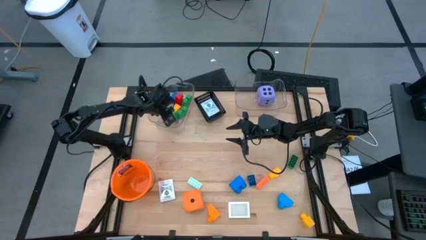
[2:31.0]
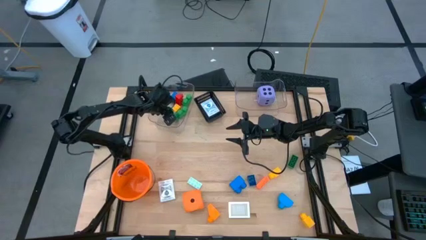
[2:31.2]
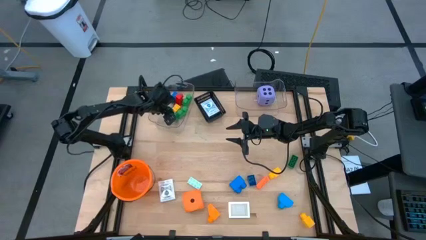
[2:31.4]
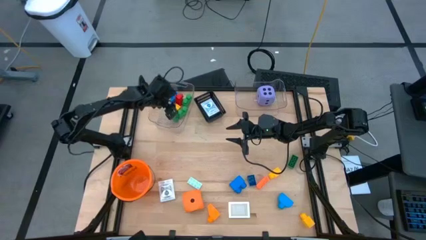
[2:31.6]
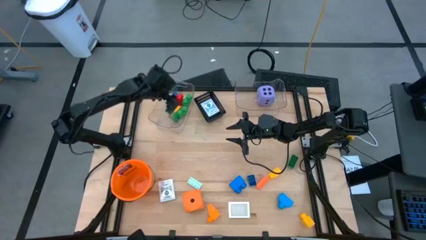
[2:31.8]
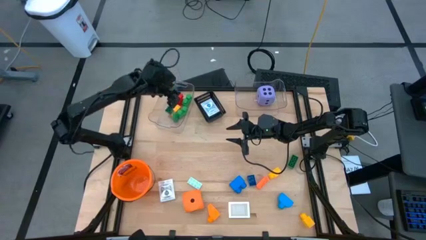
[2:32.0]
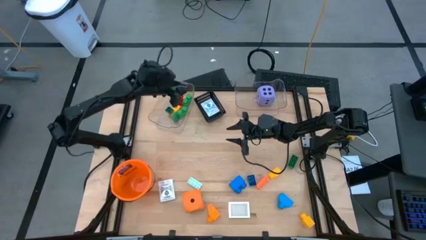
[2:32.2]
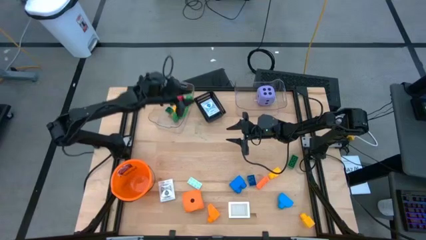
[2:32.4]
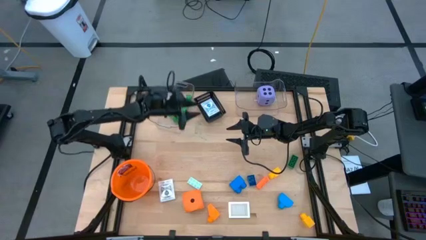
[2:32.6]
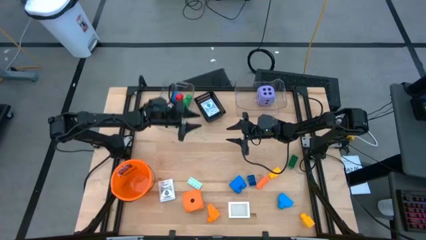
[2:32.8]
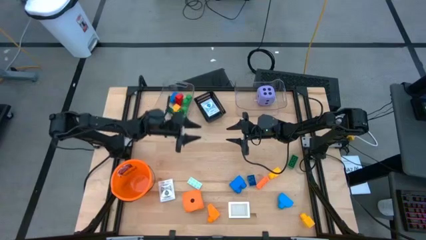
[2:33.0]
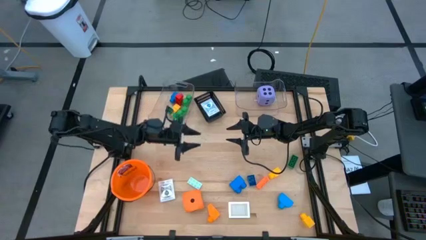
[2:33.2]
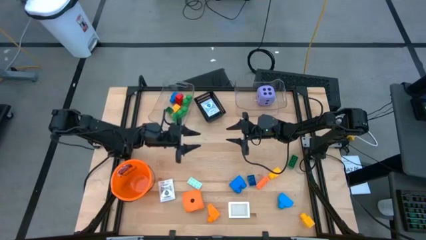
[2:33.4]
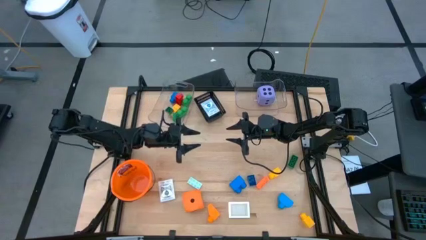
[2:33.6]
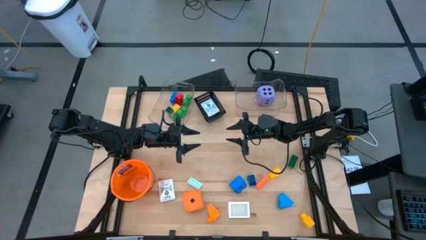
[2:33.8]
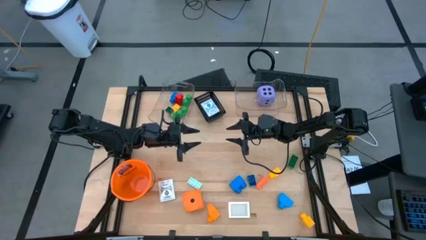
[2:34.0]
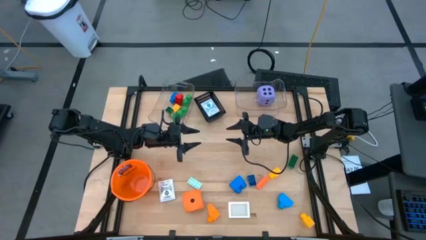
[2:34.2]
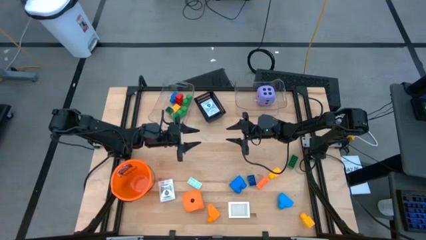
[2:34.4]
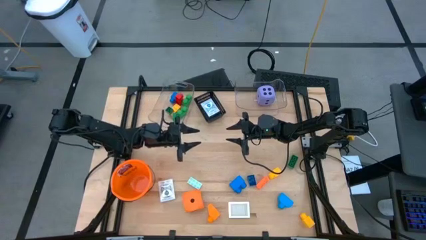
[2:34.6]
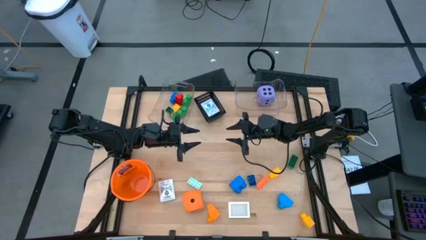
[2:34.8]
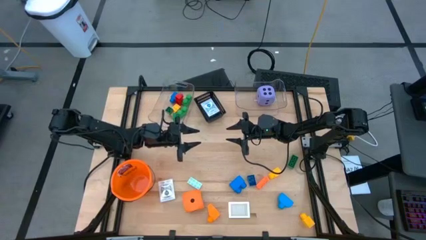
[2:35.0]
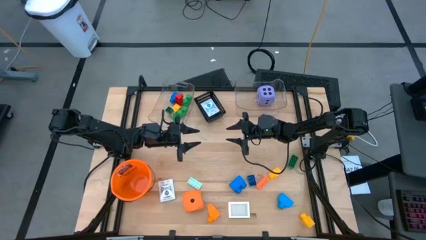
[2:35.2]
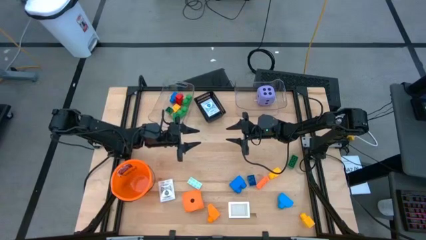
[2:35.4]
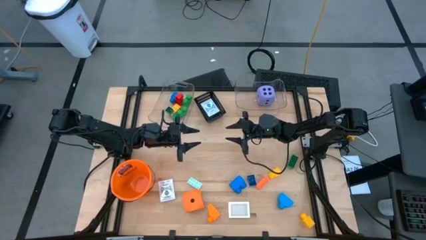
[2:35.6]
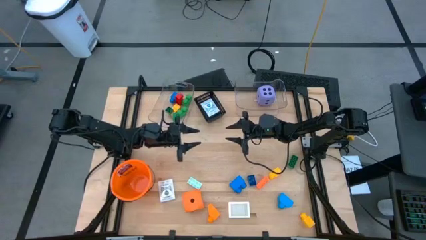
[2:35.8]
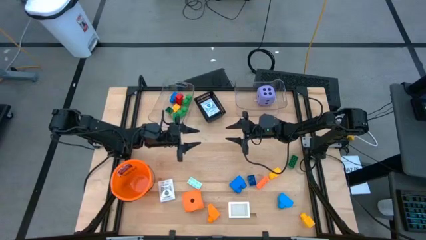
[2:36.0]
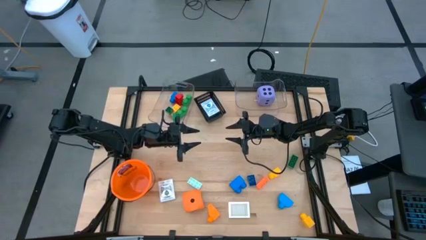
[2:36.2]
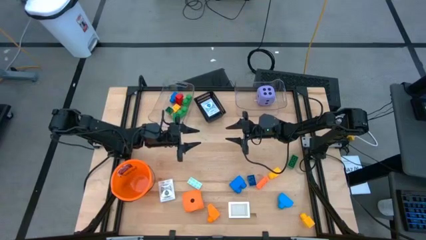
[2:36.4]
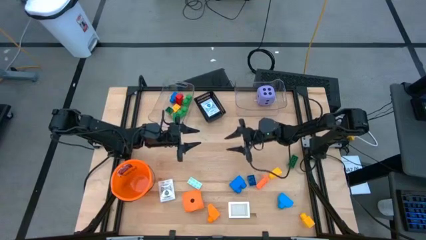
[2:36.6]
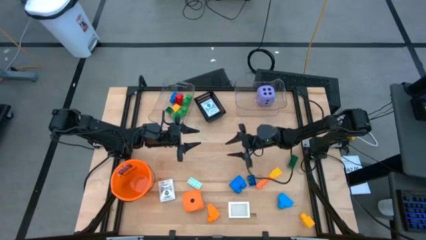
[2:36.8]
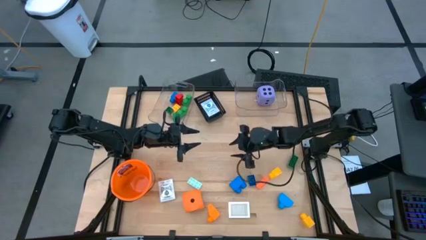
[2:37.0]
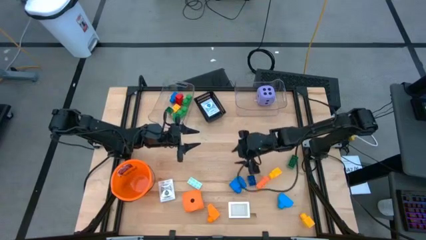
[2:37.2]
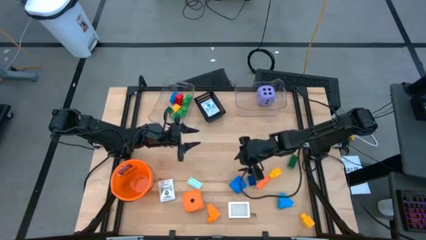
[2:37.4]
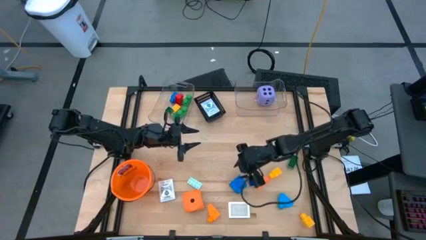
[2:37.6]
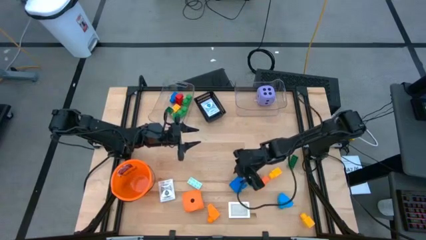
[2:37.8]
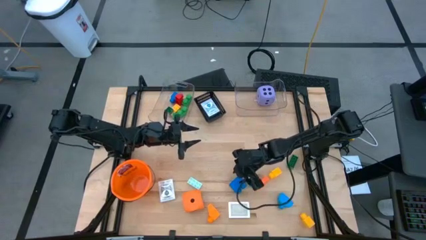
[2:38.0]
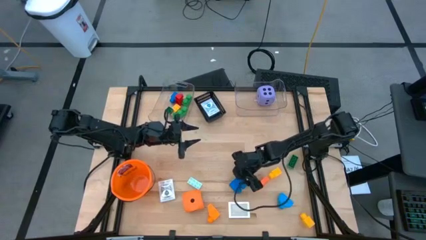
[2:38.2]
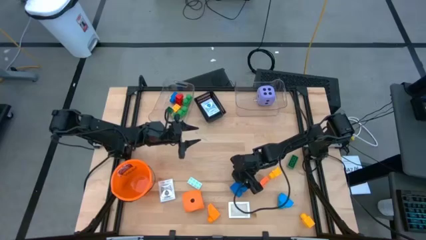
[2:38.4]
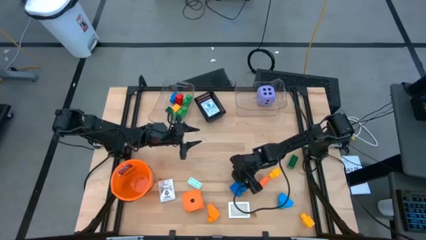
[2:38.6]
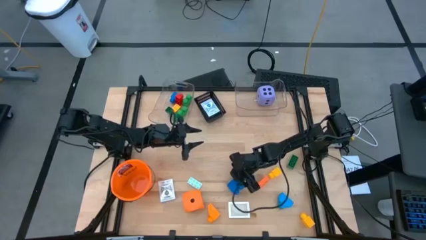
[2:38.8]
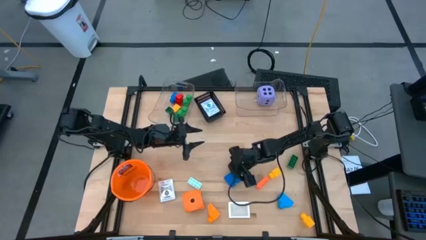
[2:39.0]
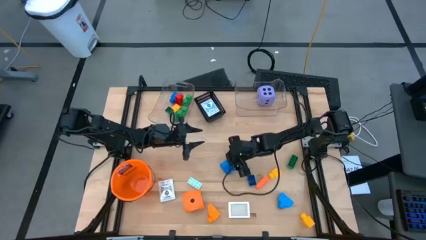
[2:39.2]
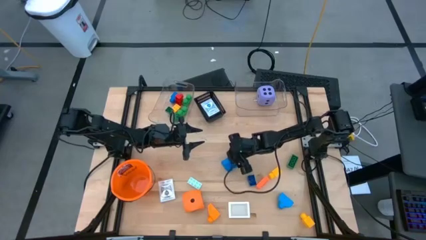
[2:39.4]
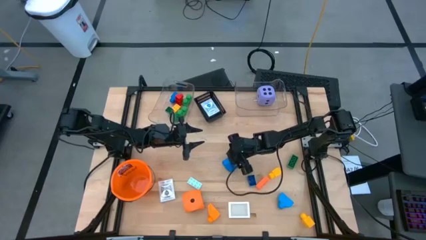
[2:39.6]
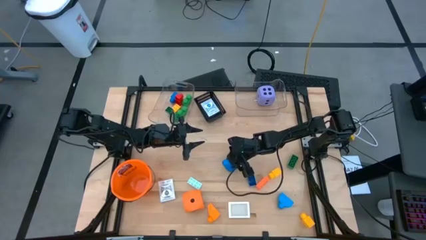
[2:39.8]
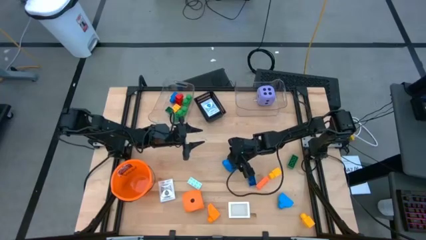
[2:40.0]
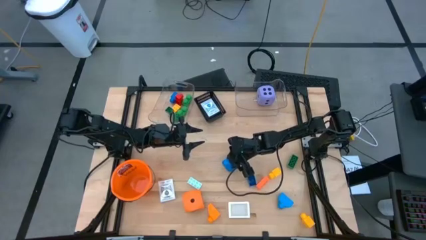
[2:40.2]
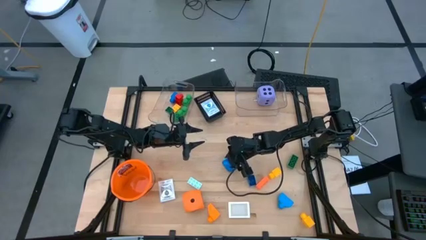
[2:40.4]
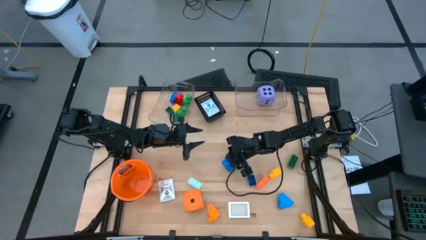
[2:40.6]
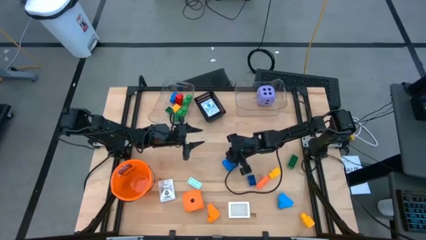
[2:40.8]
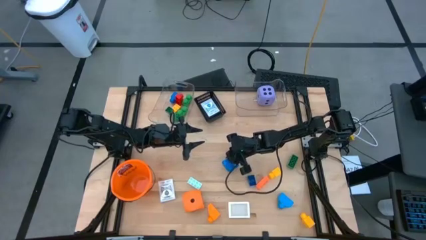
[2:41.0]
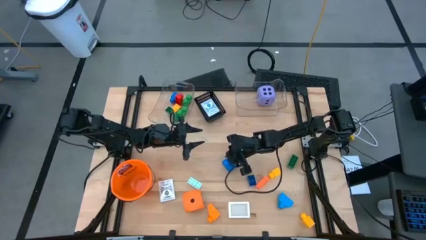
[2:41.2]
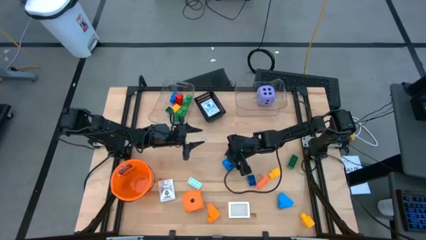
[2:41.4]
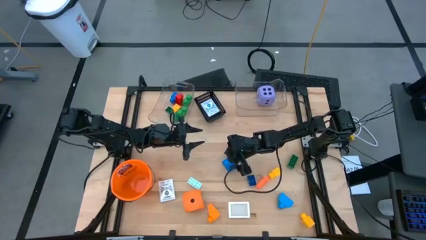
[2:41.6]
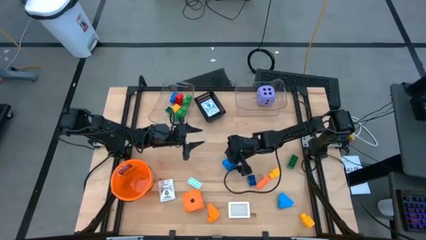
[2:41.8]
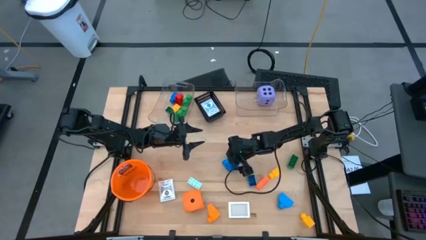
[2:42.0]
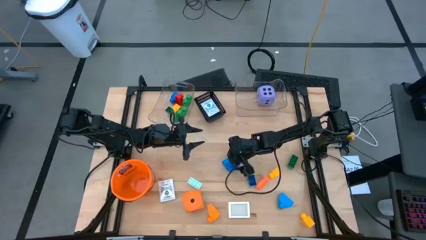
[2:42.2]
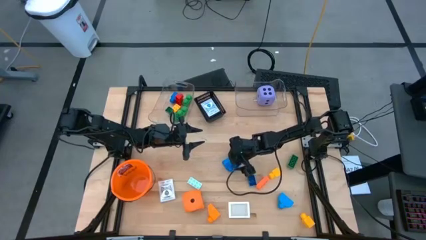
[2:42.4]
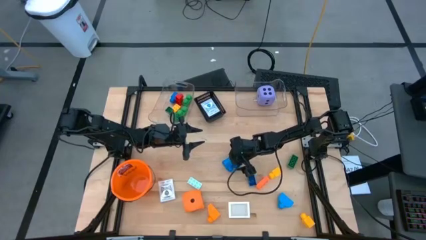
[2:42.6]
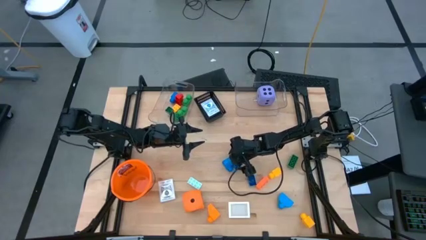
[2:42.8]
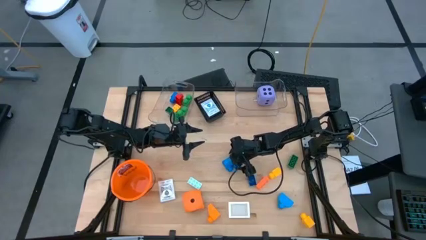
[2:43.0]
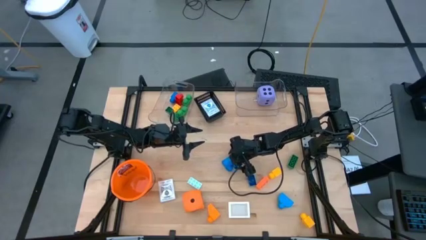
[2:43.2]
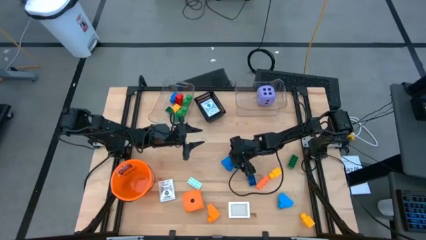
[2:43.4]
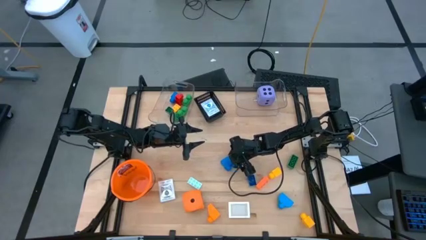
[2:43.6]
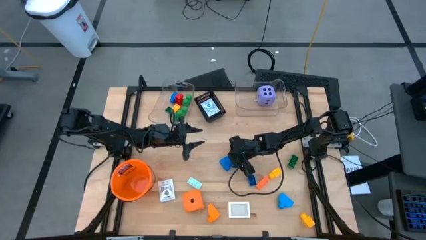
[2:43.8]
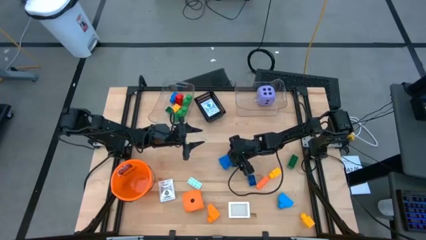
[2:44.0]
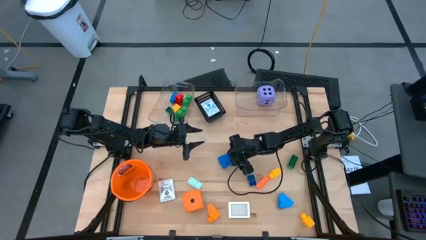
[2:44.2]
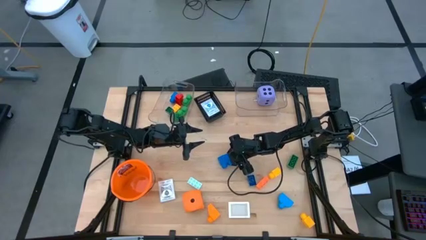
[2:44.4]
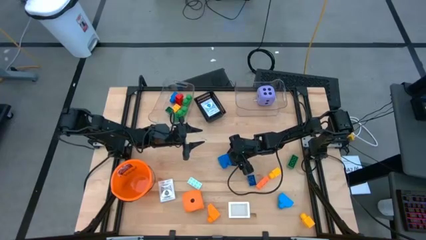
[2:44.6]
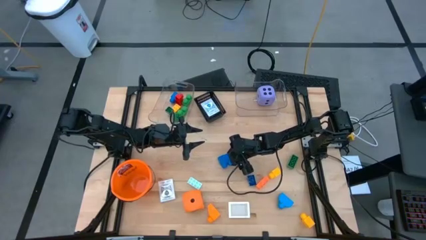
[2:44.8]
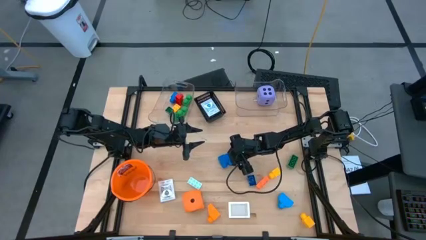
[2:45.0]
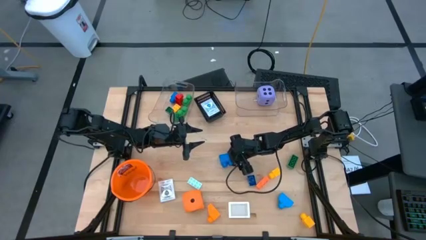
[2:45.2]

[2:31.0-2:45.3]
Task: Pick & Place Toys
Put the blue gamepiece into the left transparent bin
